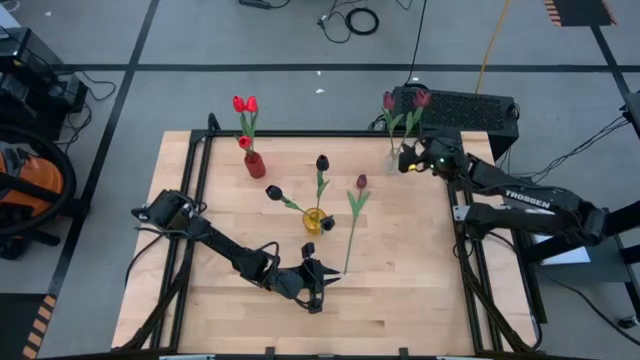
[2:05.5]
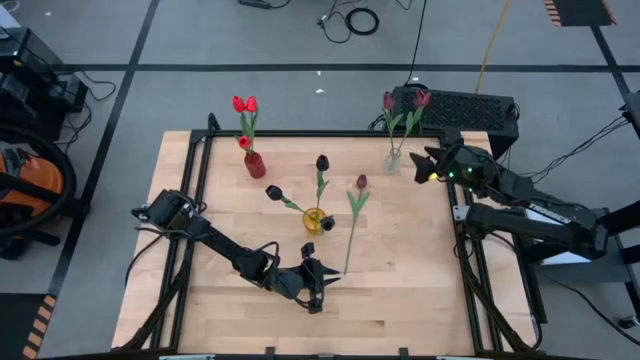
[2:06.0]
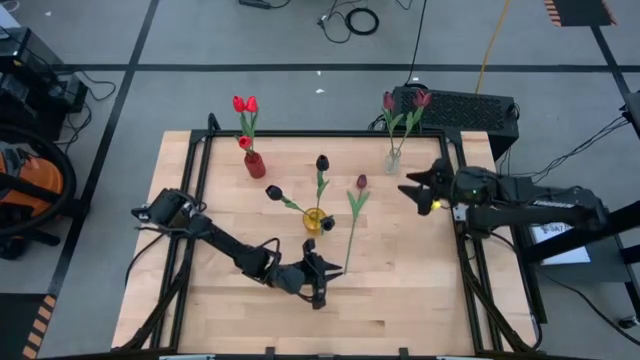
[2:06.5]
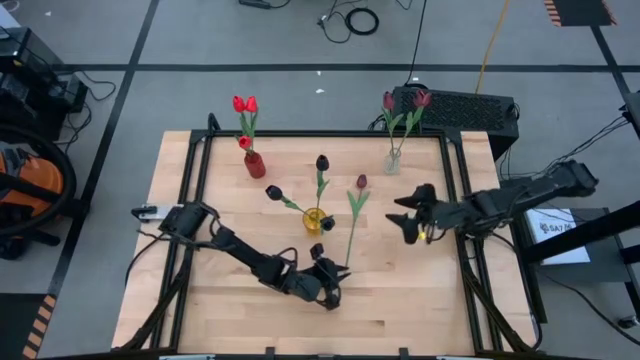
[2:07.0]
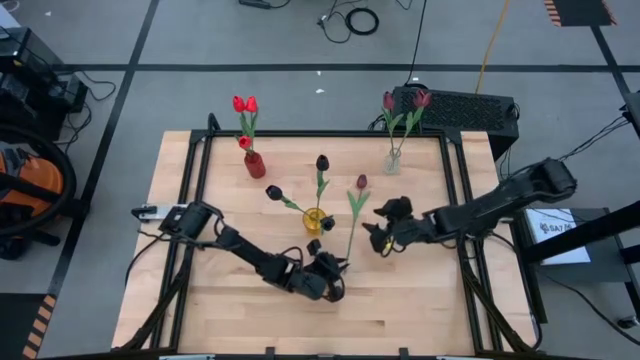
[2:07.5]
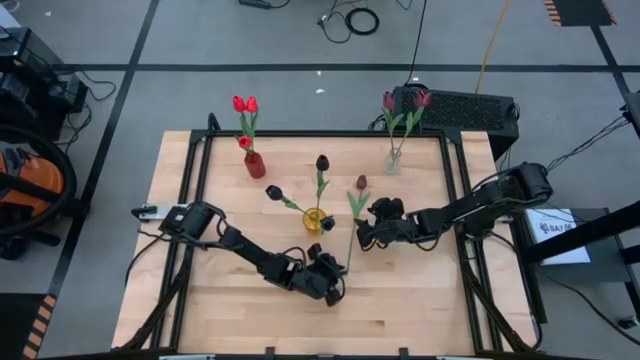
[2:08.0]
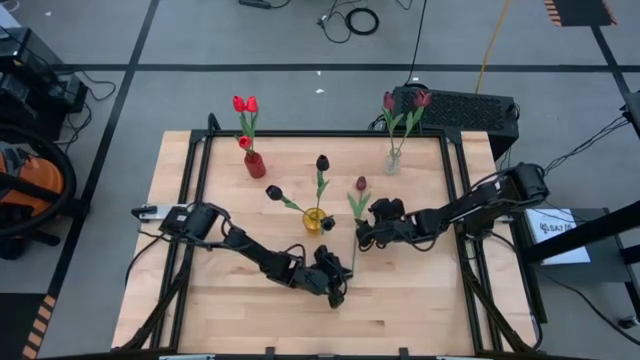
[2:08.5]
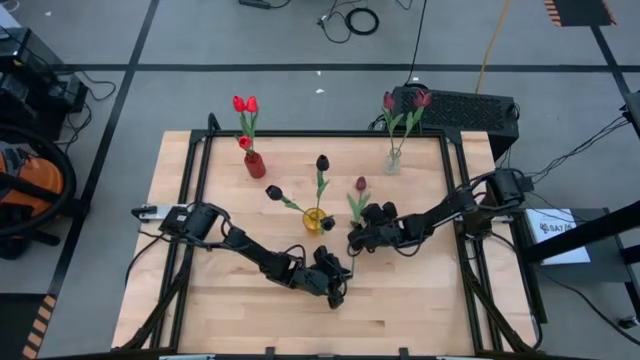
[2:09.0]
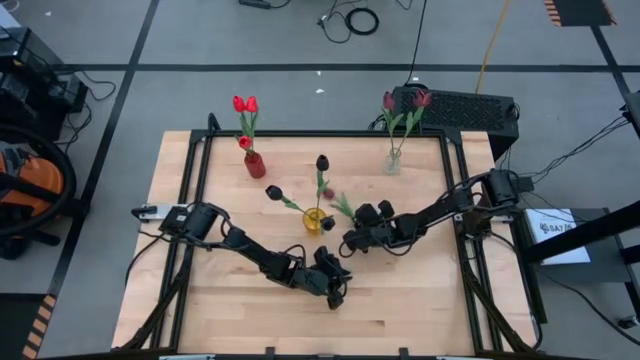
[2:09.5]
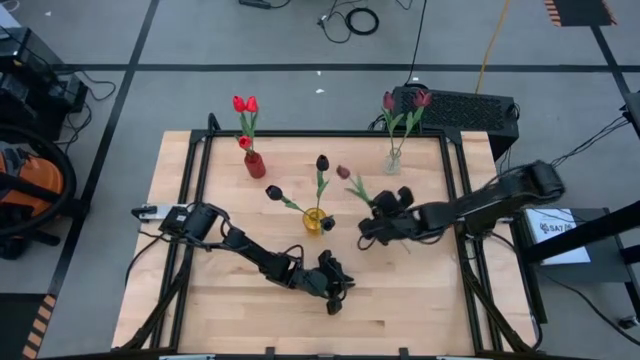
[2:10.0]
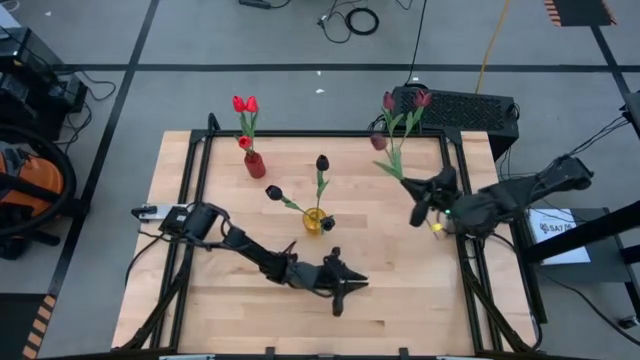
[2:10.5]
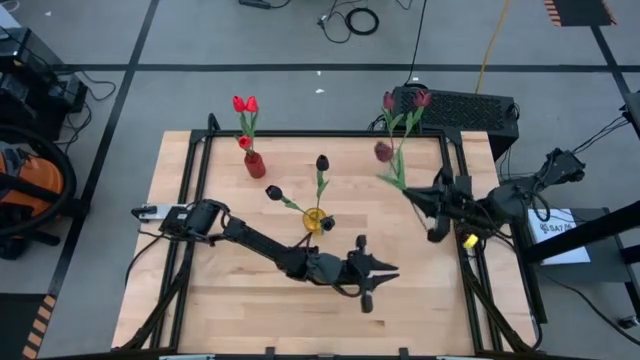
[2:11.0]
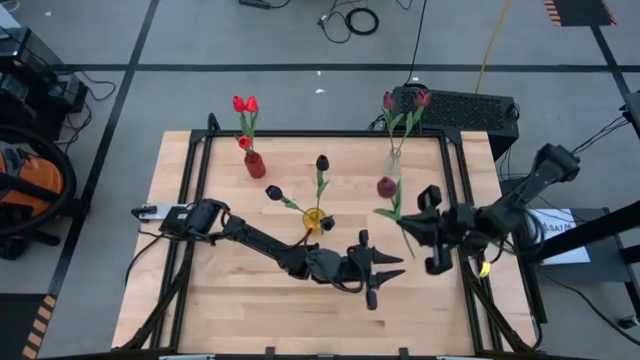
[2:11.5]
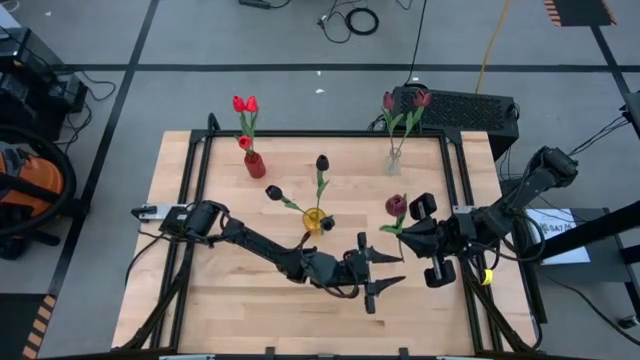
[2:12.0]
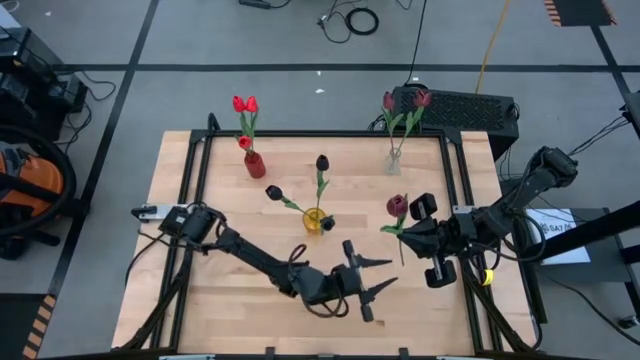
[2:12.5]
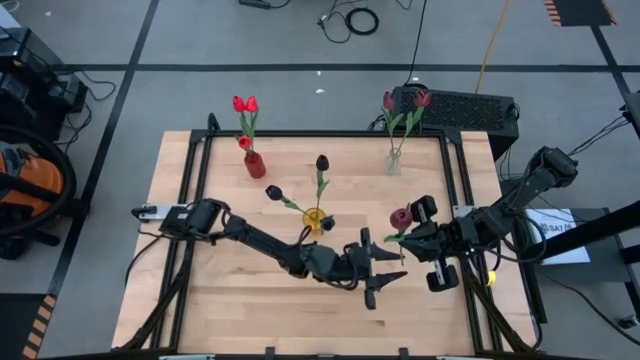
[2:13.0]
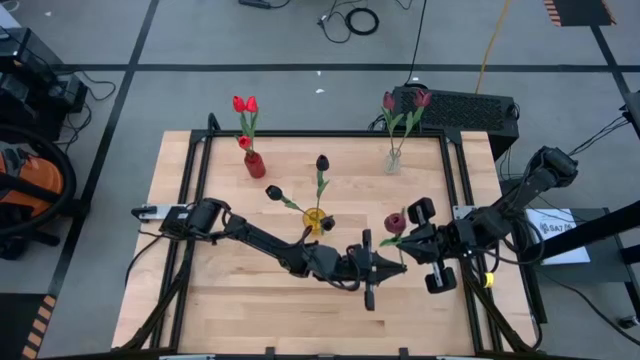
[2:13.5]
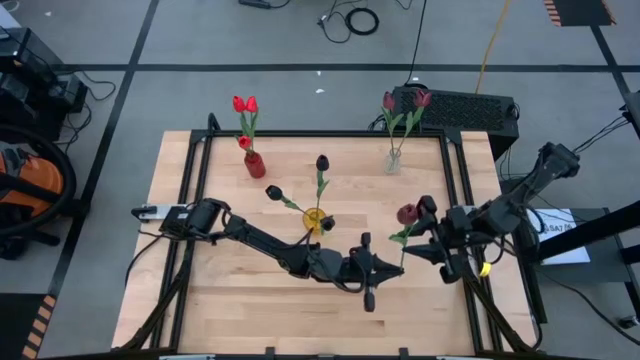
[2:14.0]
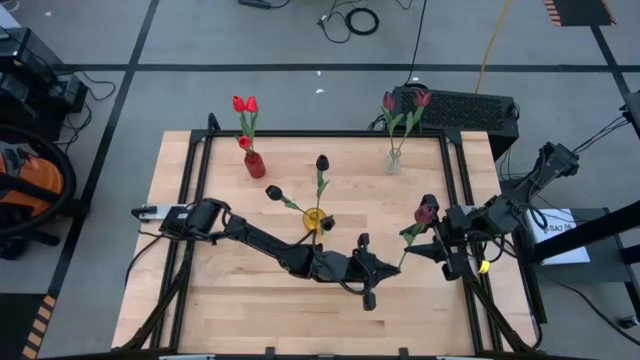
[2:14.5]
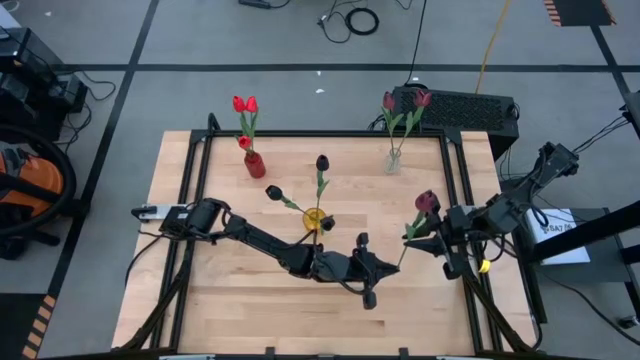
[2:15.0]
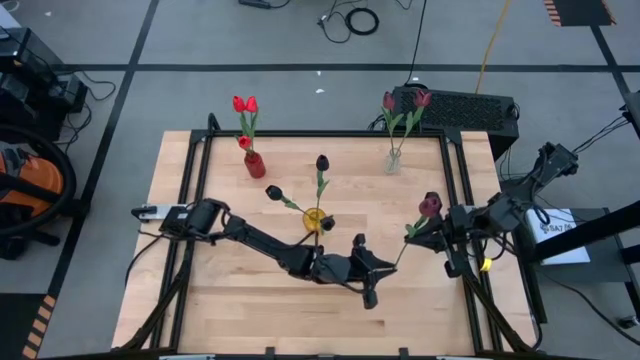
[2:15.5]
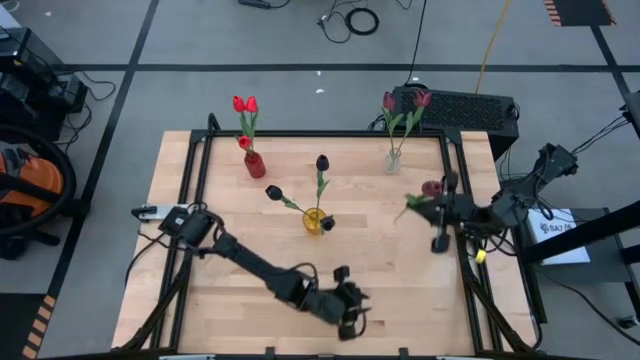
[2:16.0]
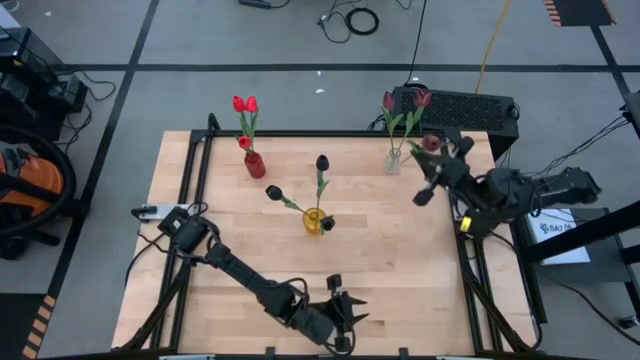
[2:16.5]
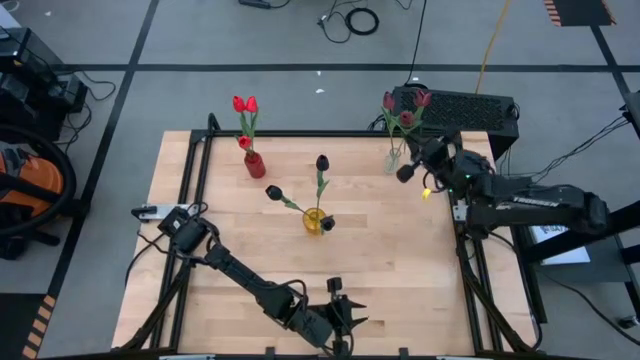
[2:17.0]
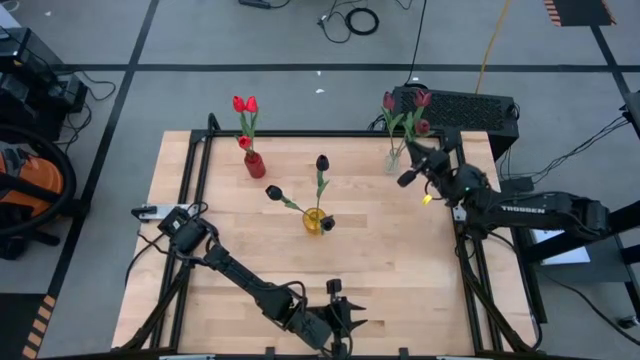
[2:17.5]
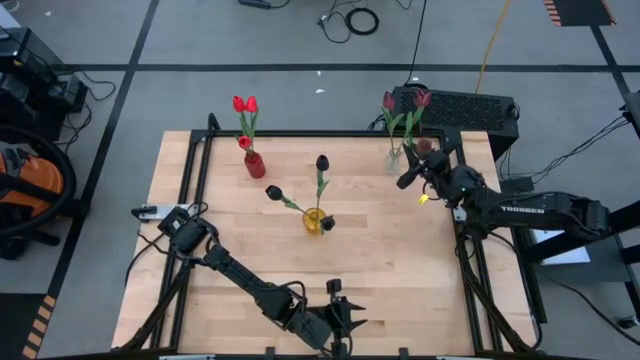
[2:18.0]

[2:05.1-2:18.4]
Task: Sort flowers into vase by color
Put the dark red flower into the transparent vase

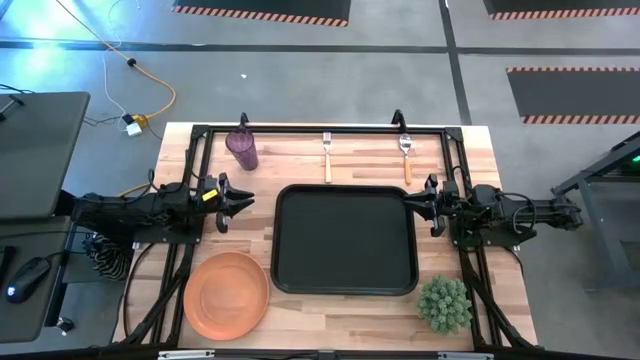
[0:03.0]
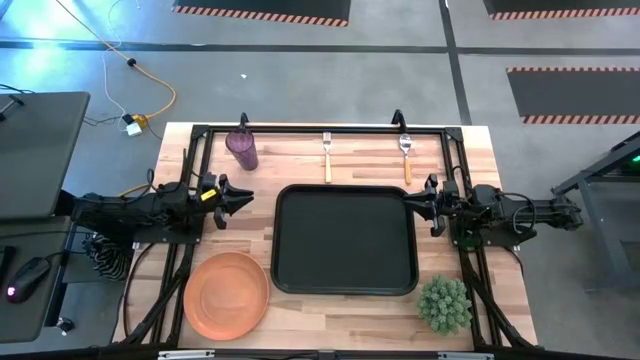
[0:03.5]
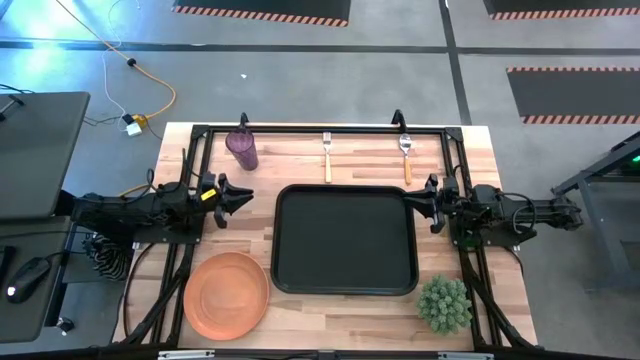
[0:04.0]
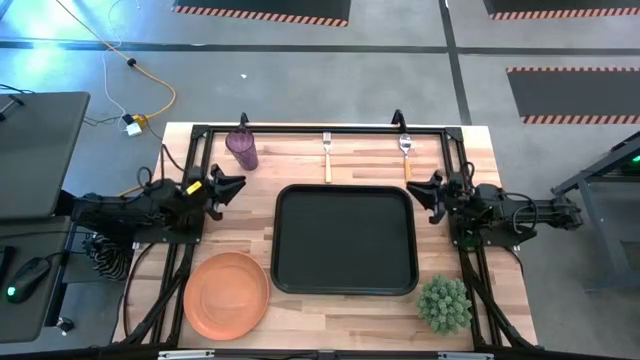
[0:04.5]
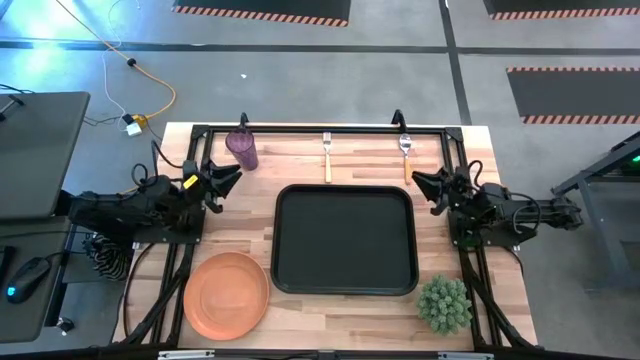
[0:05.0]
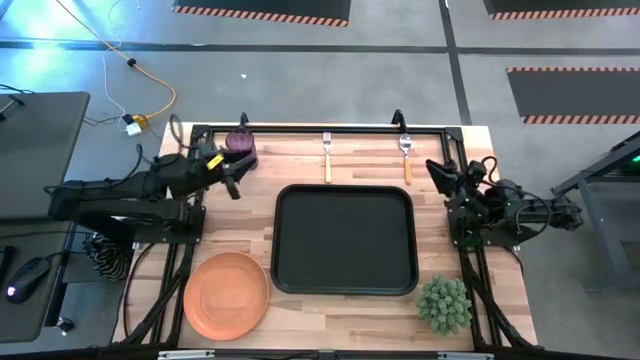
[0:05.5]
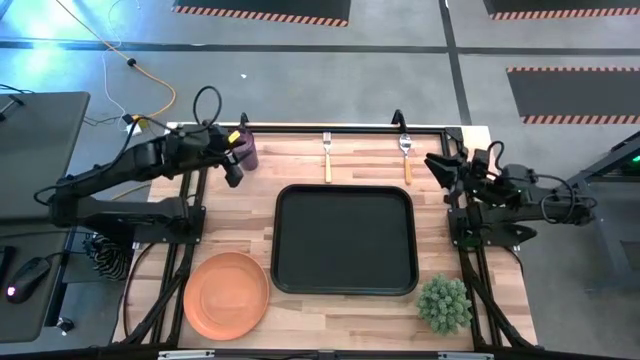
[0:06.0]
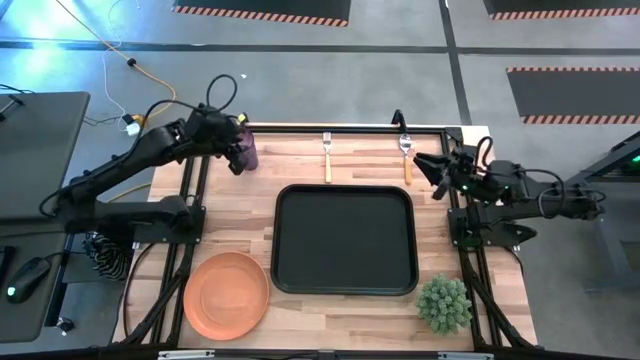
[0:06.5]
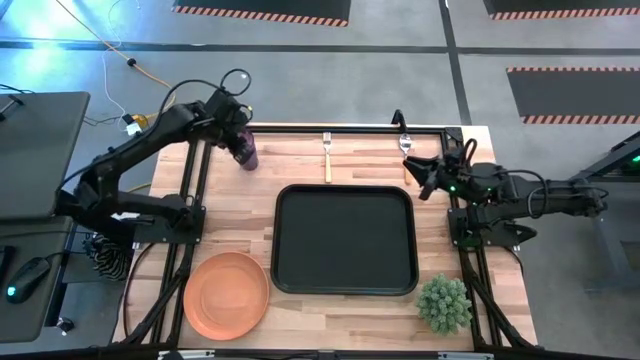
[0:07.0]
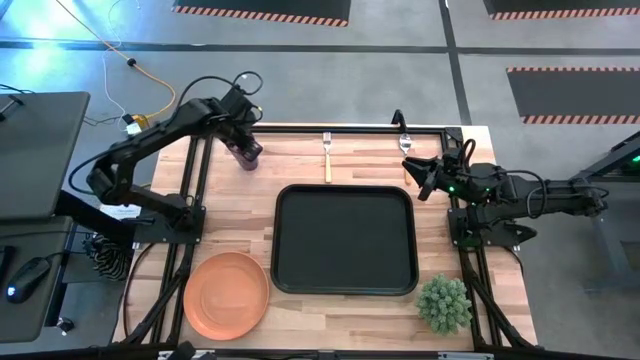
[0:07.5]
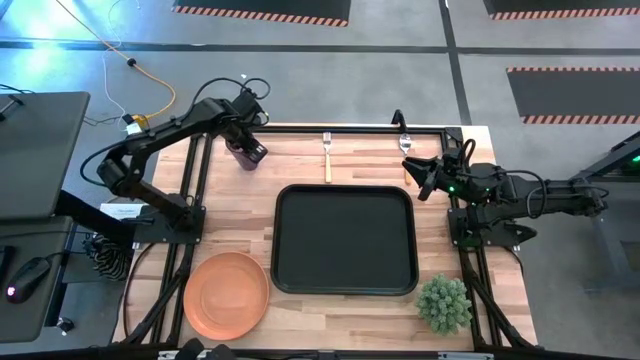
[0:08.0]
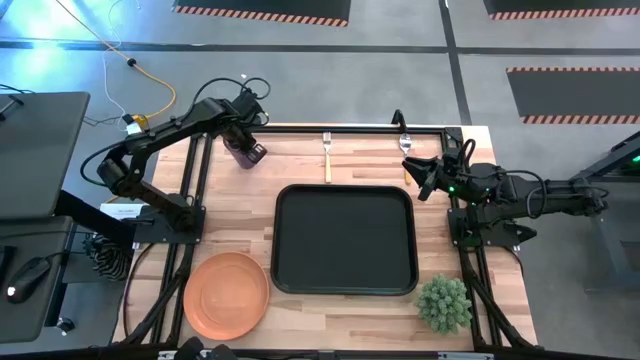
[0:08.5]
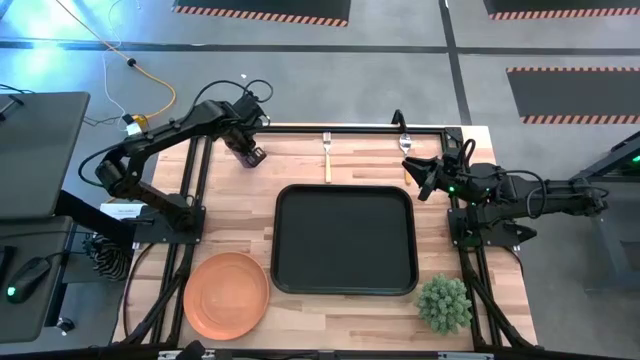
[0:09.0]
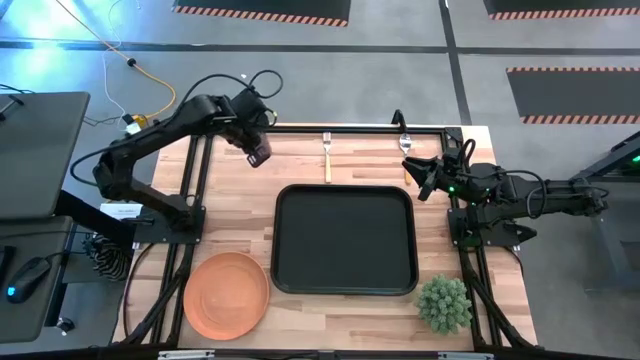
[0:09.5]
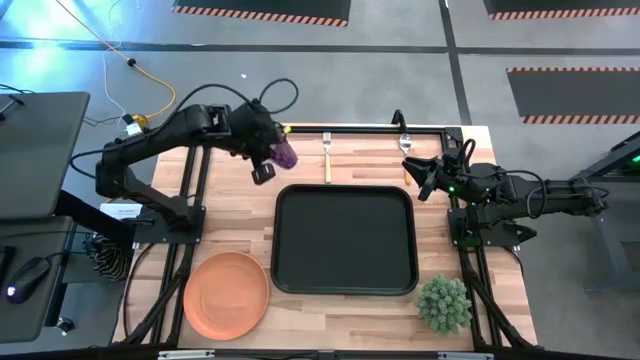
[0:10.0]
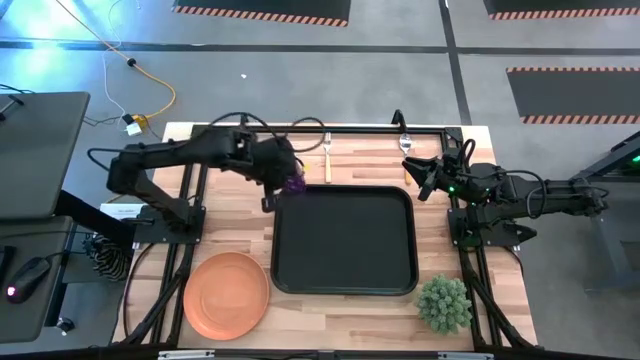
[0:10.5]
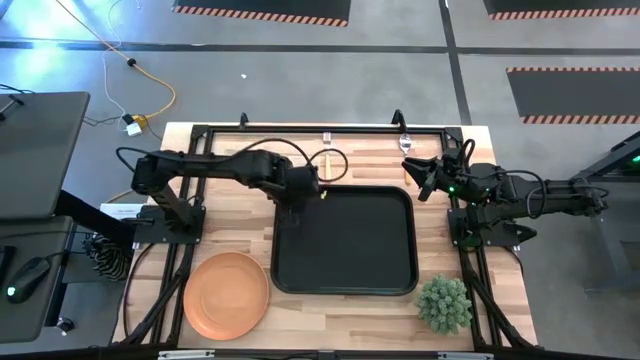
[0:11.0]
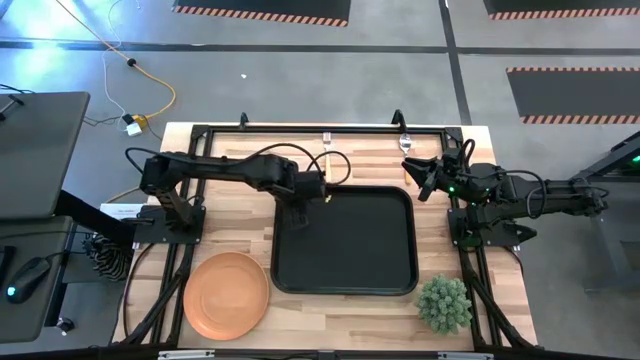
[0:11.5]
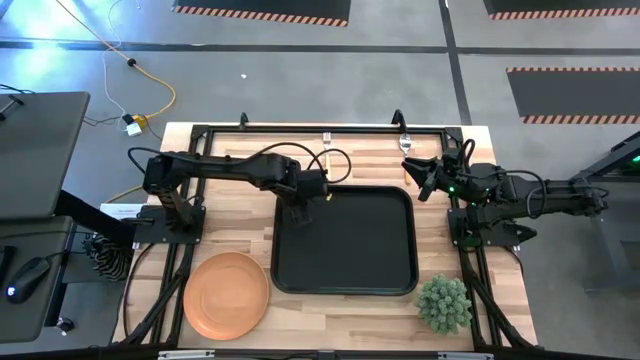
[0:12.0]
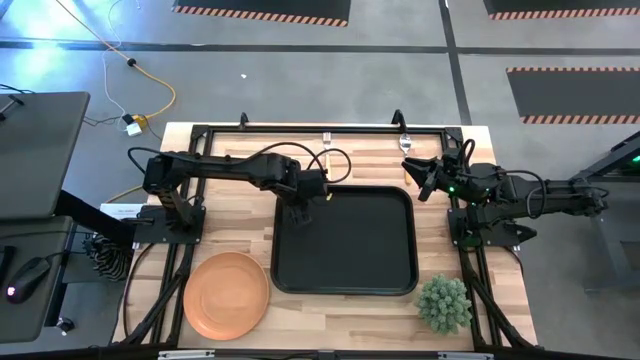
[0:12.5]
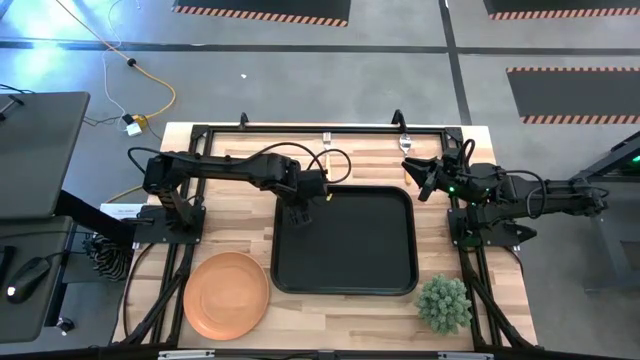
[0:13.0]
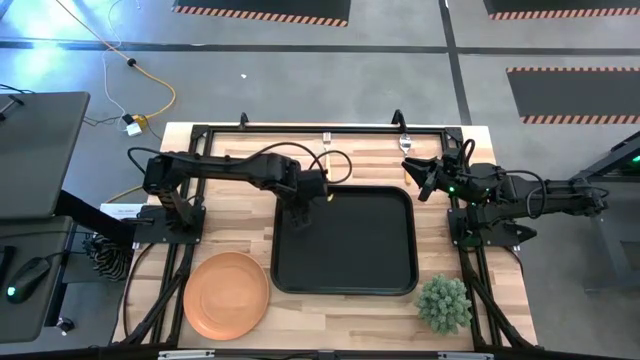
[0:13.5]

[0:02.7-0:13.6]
Task: Pick and place plate/cup/fork/spoon on tray
Put the purple cup on the black tray
